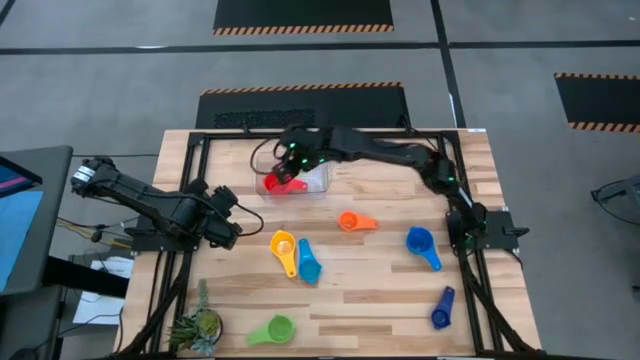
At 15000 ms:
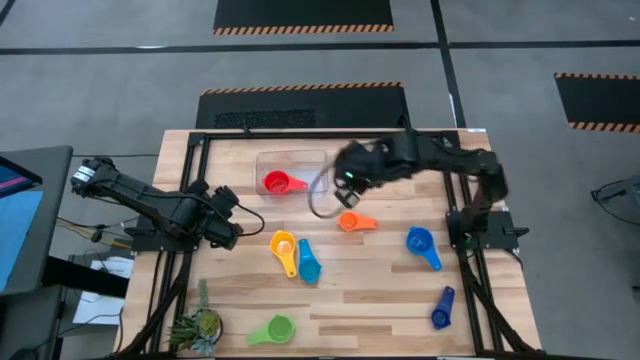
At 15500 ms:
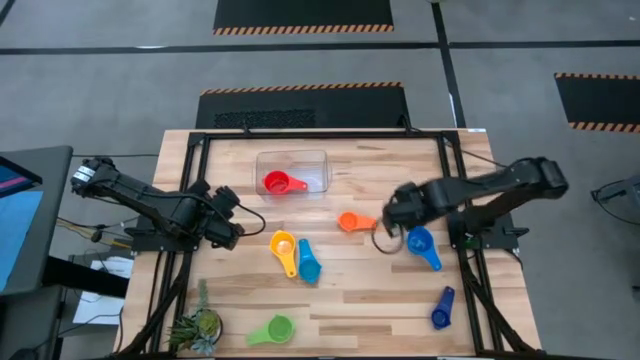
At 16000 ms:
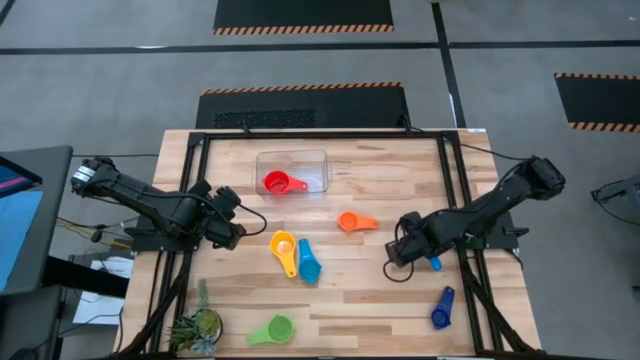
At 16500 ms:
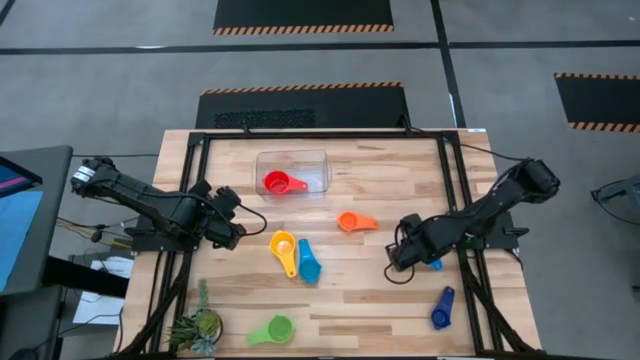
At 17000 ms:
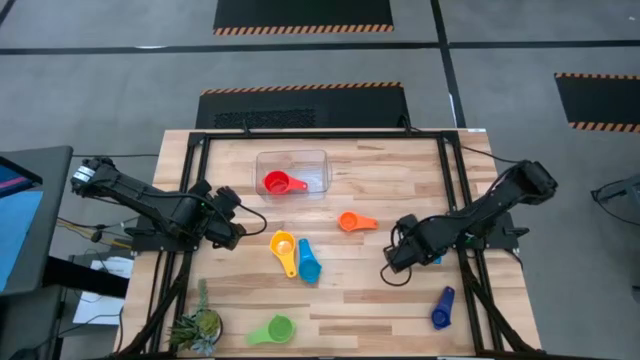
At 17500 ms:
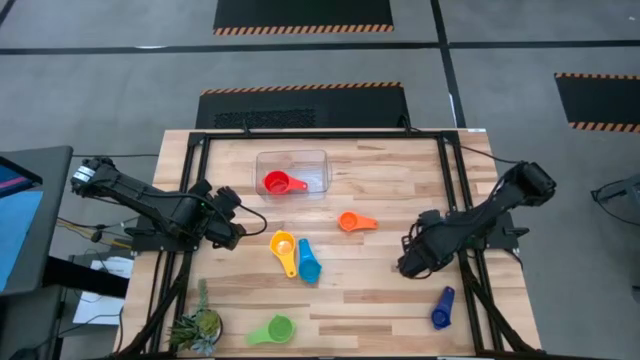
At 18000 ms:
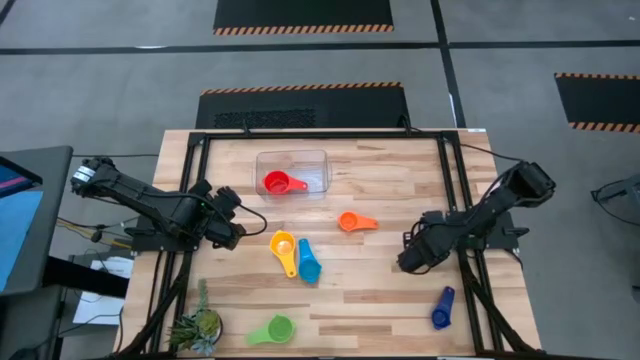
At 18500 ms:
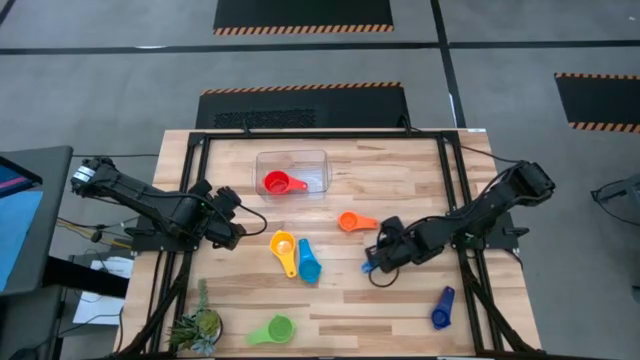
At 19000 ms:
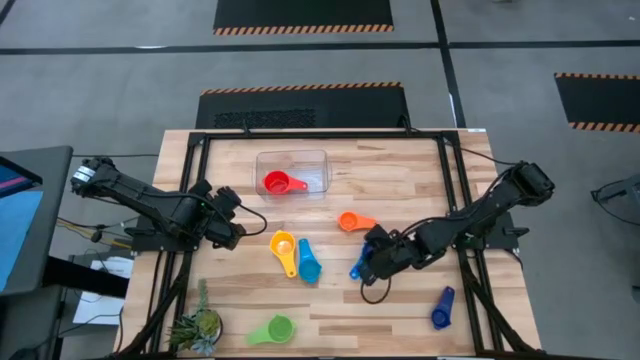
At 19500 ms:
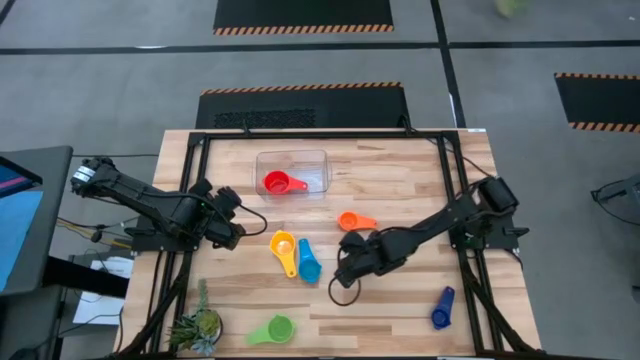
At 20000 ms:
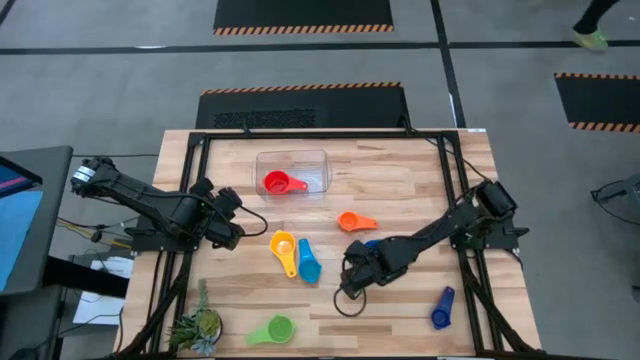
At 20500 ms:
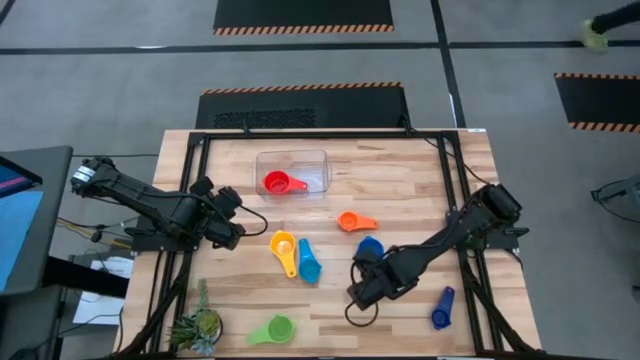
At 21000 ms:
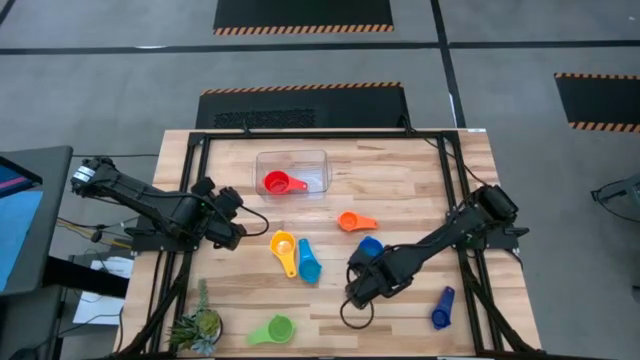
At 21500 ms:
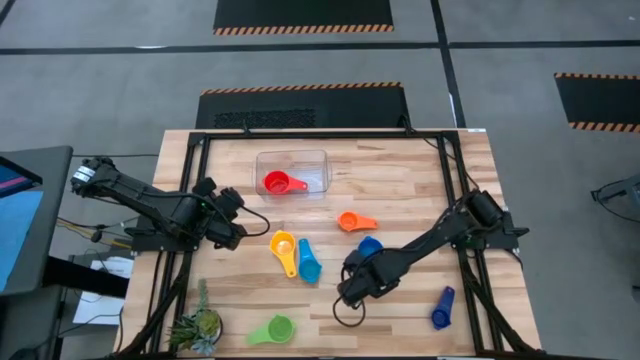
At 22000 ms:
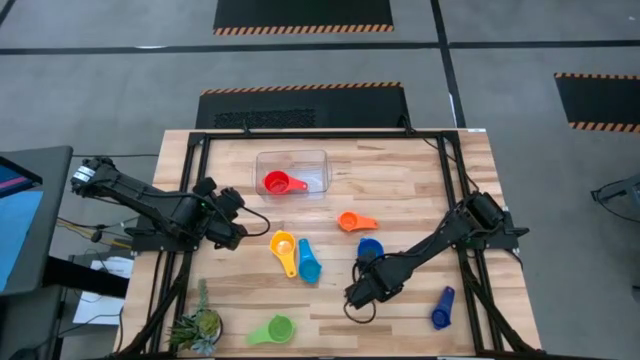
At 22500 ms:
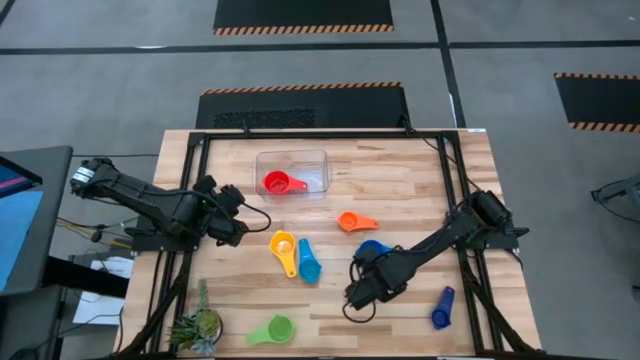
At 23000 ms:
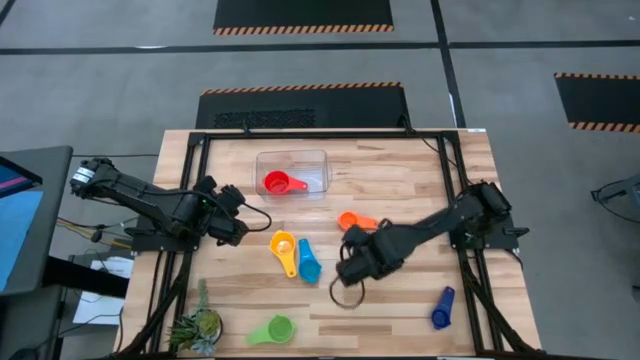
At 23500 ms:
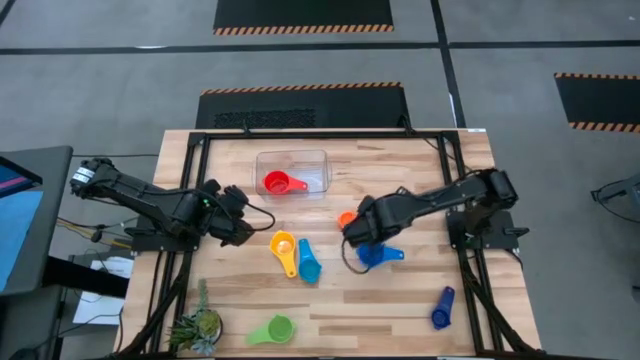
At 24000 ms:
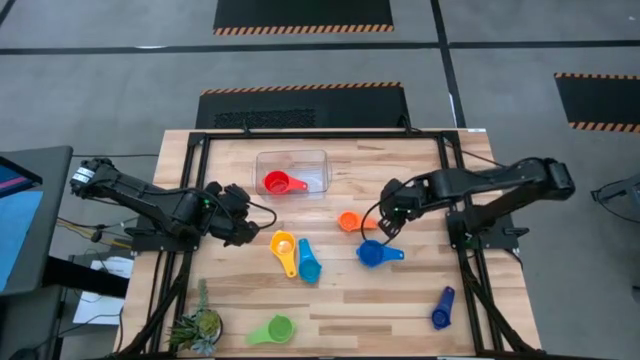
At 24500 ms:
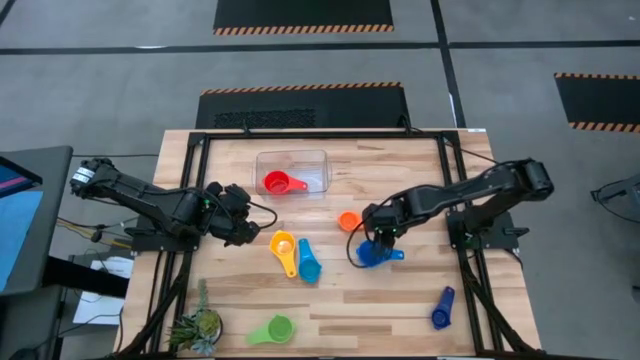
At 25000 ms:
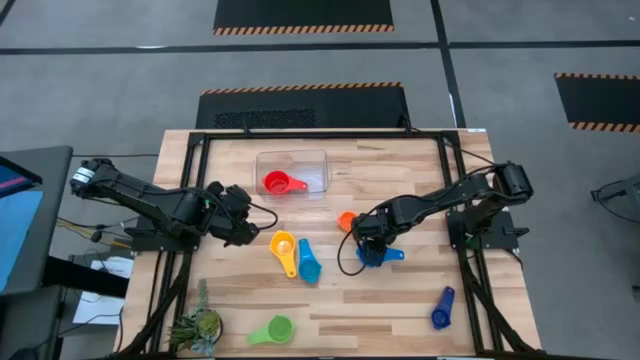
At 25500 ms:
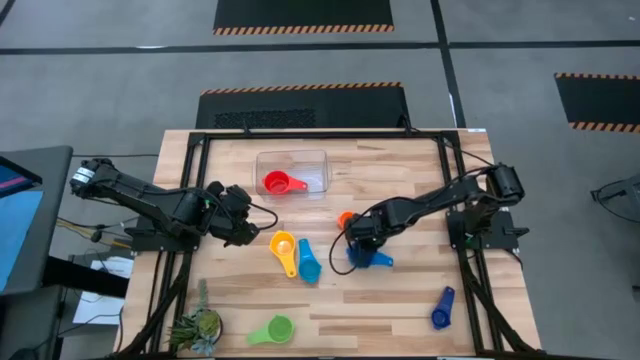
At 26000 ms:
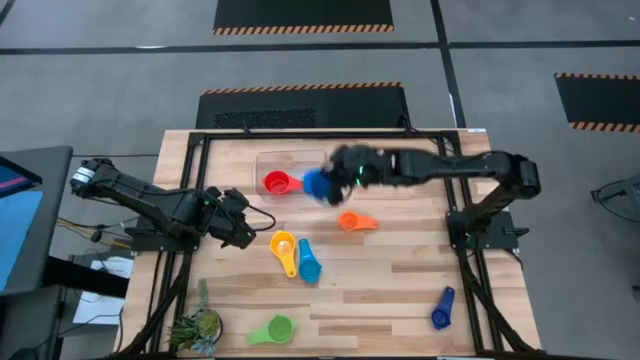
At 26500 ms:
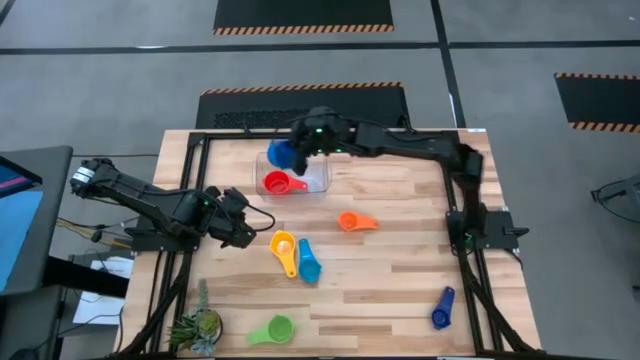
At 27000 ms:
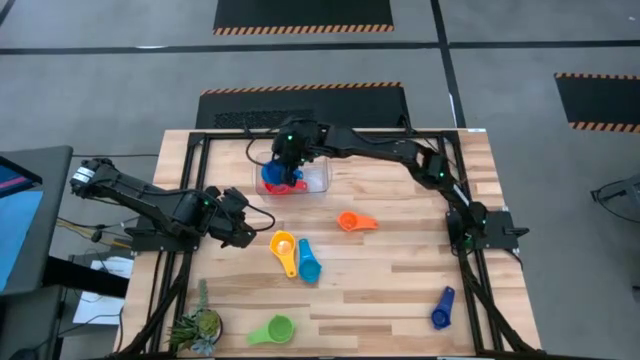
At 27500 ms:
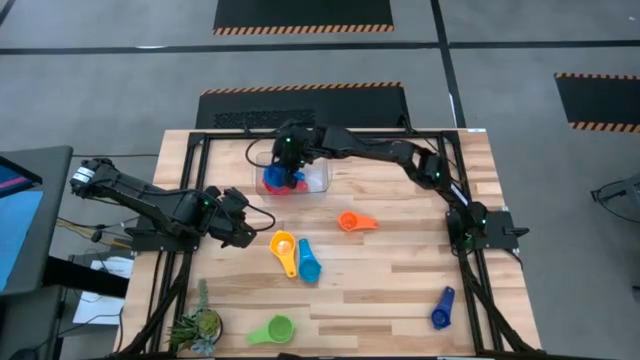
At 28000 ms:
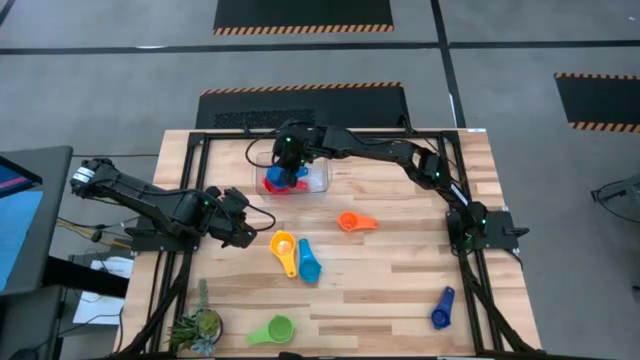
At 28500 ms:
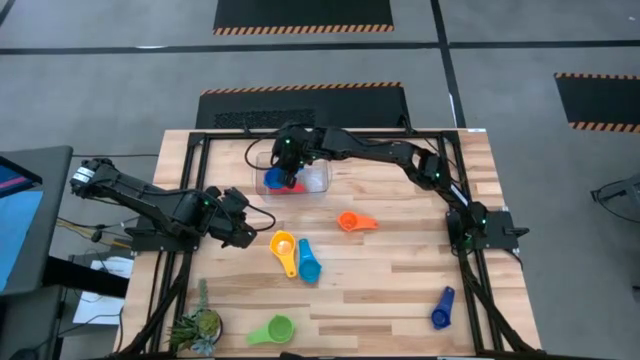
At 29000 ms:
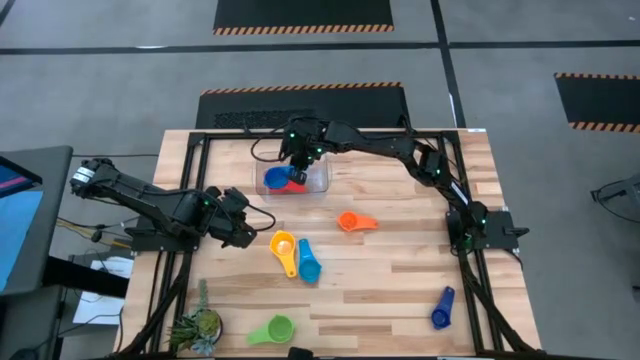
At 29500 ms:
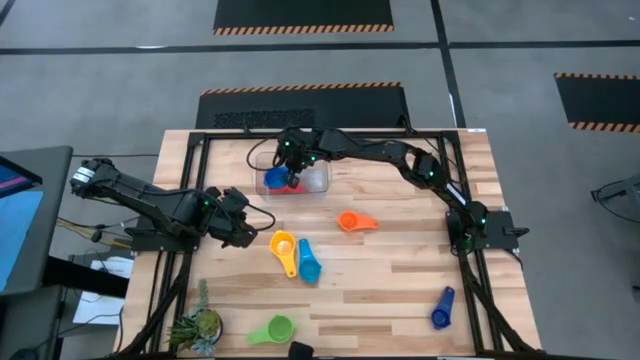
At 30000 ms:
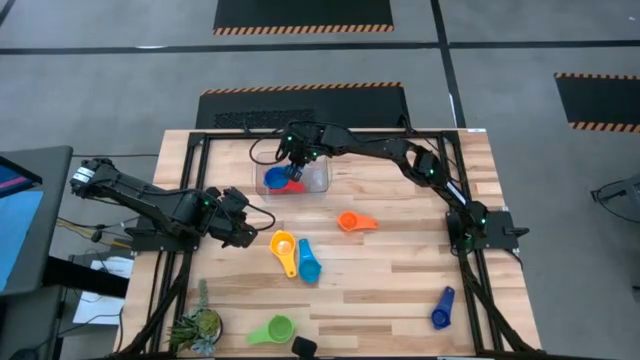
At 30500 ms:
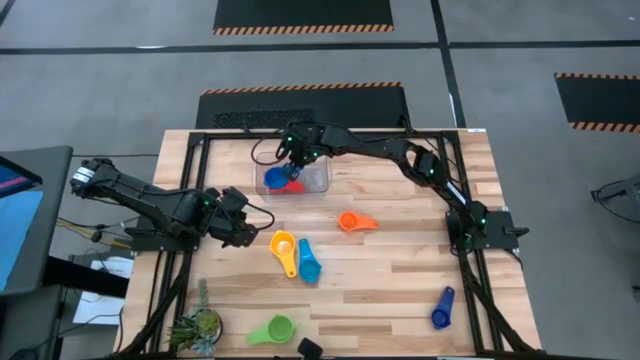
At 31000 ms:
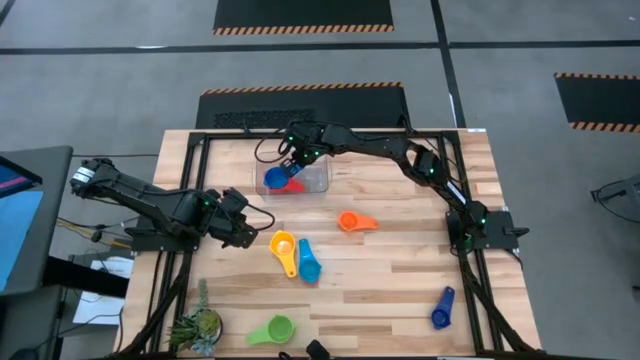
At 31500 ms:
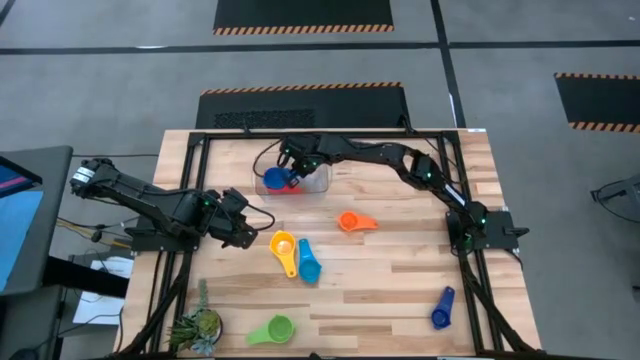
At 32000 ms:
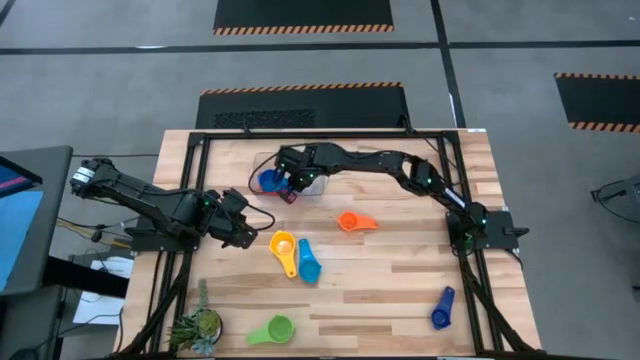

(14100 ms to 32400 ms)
Task: Nest measuring cups in basket
Stack the blue measuring cup on top of the red measuring cup in the transparent bin

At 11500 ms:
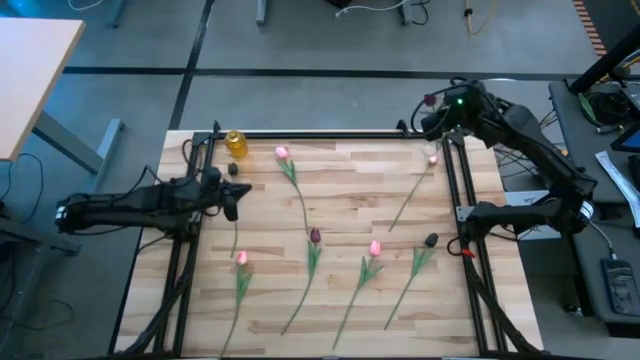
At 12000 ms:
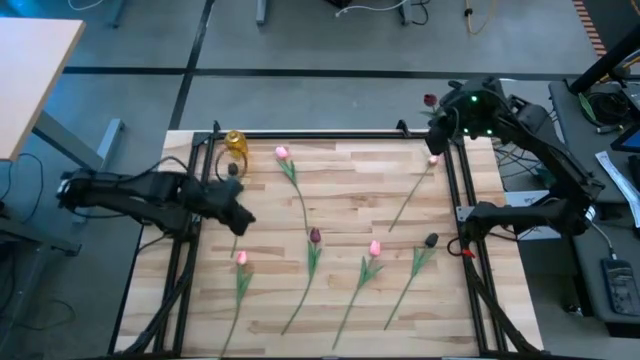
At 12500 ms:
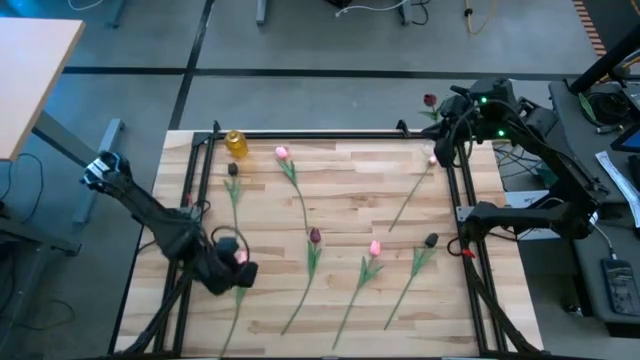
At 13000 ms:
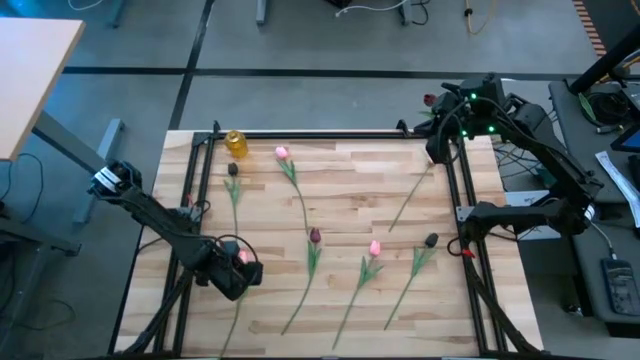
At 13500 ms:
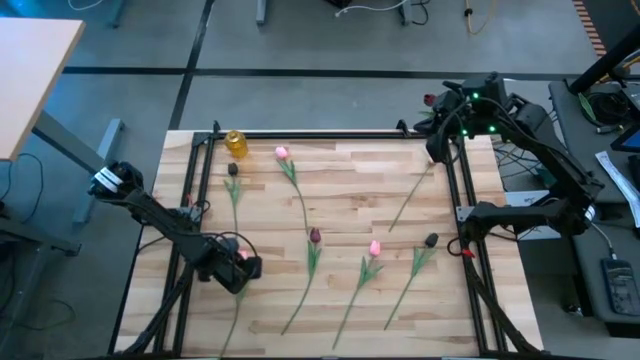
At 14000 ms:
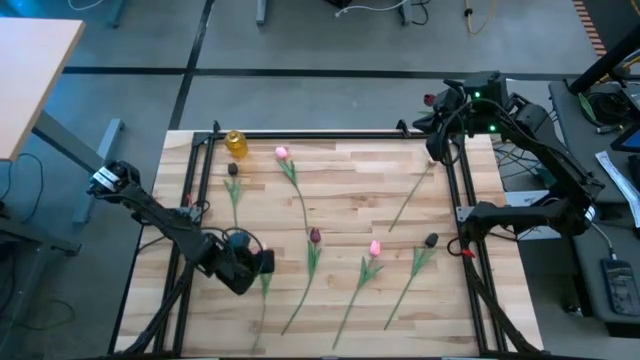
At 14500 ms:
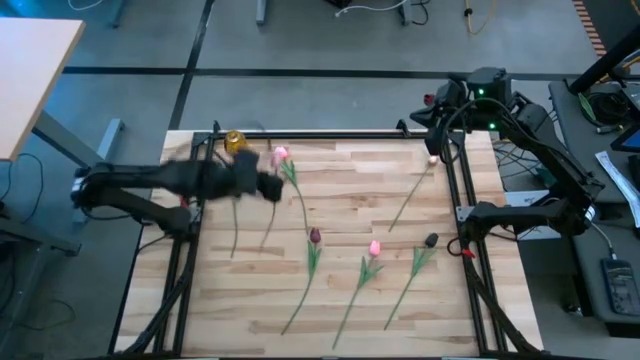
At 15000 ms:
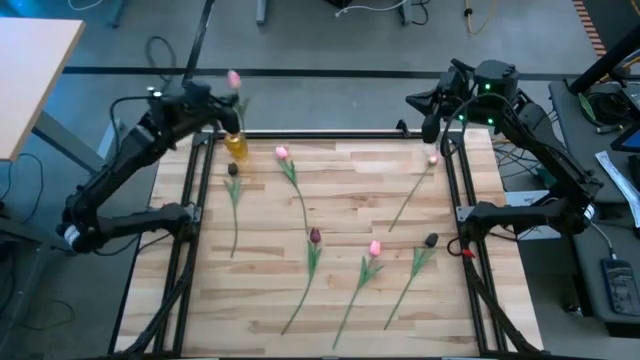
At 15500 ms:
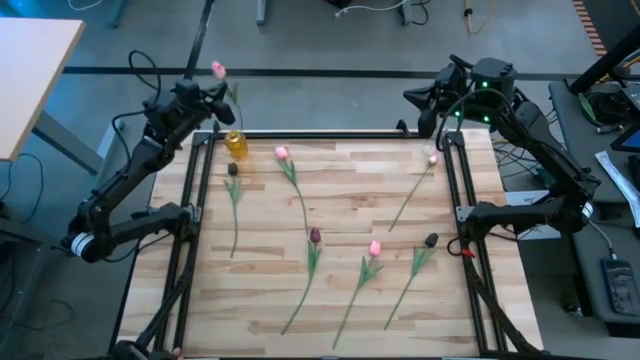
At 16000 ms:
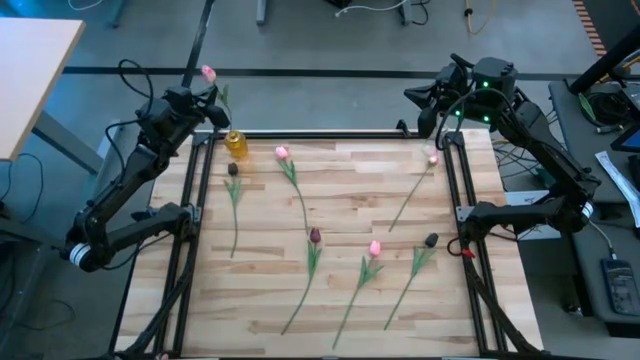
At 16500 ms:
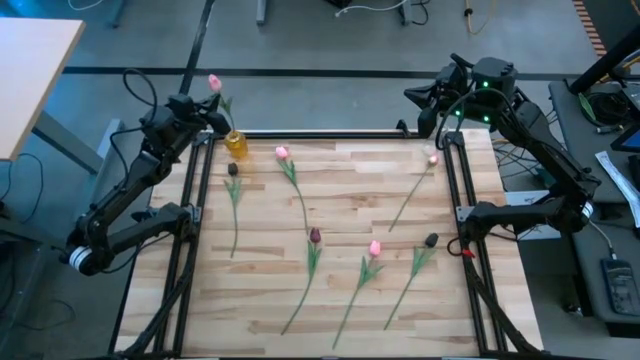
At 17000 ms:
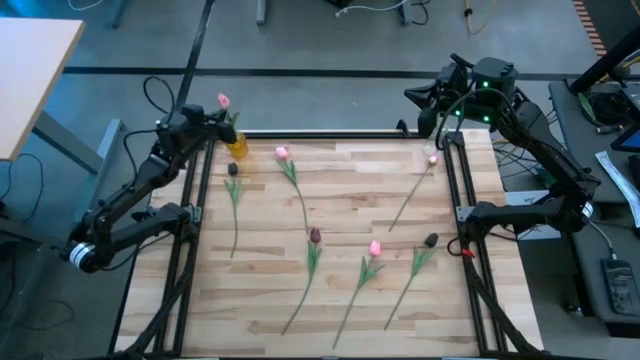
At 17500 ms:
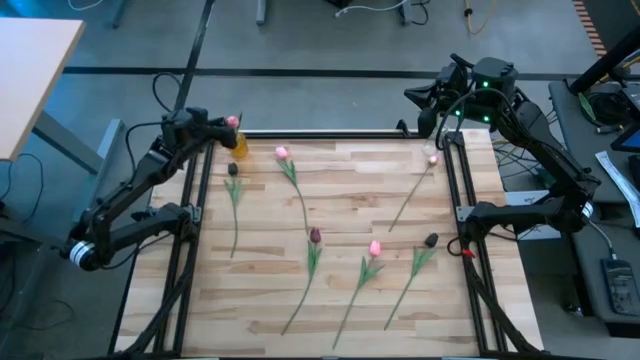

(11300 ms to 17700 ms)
Task: Sort flowers into vase by color
Put the pink tulip into the yellow vase
